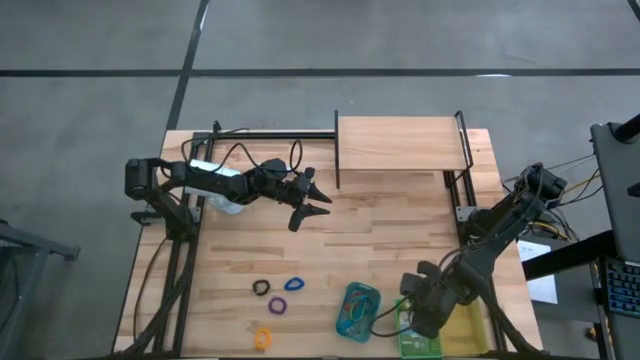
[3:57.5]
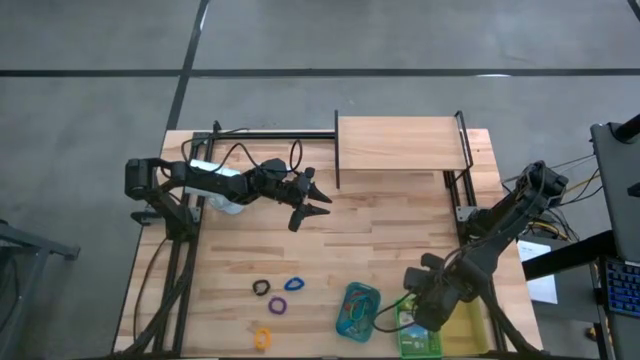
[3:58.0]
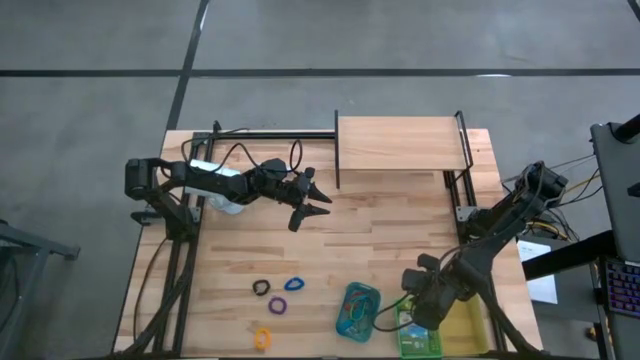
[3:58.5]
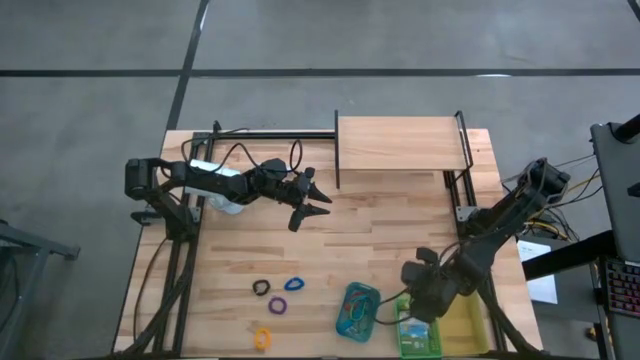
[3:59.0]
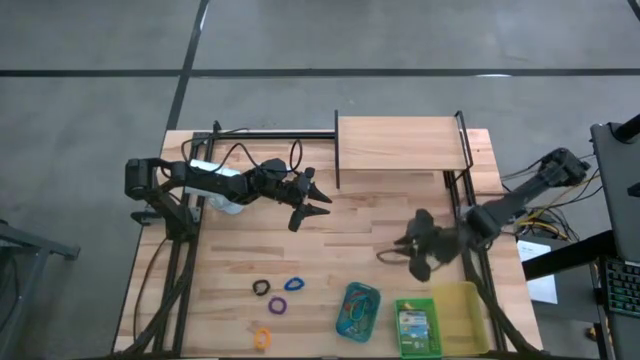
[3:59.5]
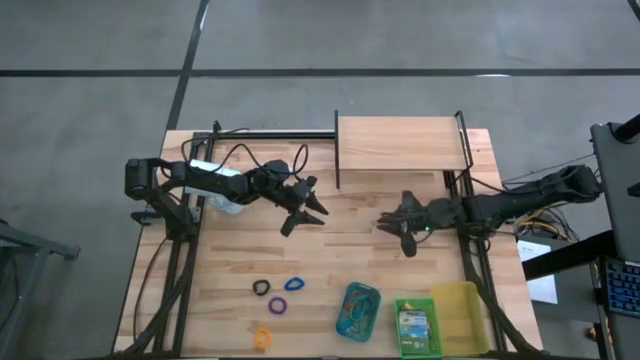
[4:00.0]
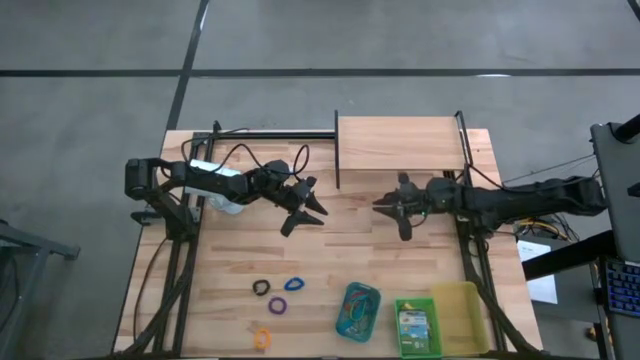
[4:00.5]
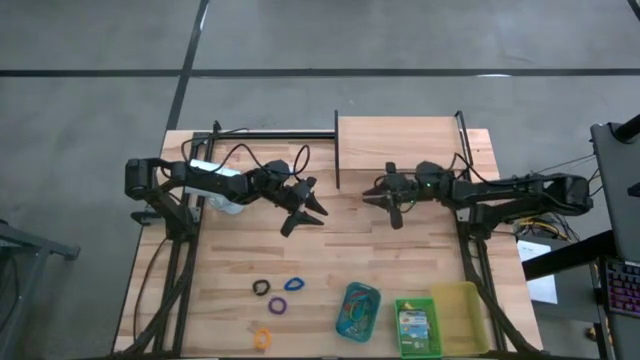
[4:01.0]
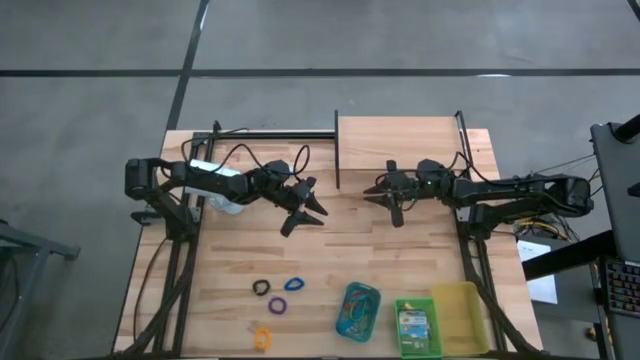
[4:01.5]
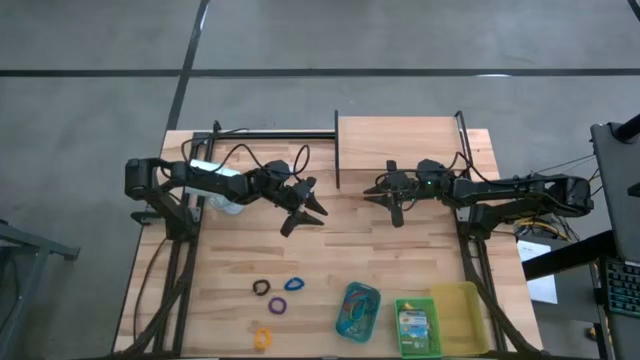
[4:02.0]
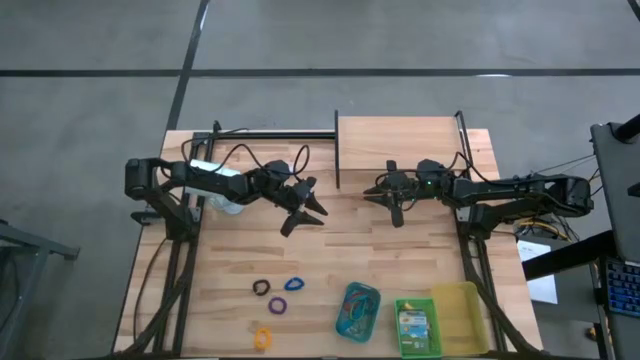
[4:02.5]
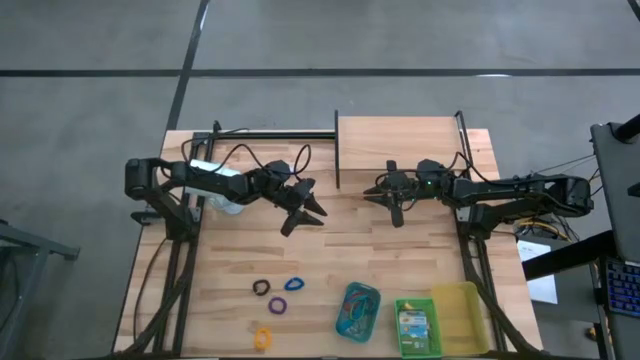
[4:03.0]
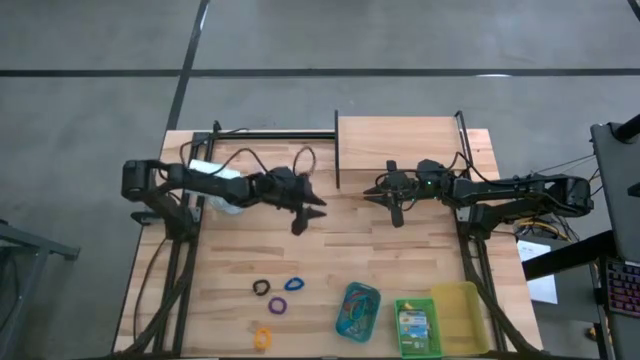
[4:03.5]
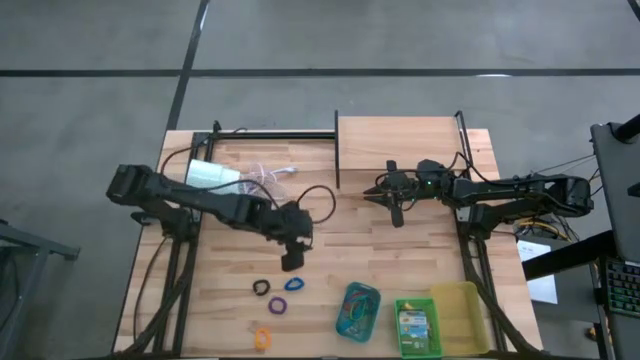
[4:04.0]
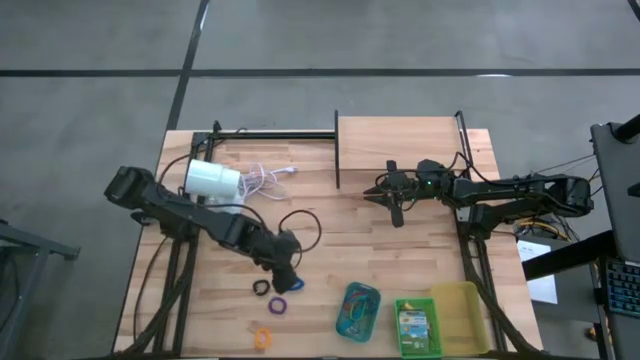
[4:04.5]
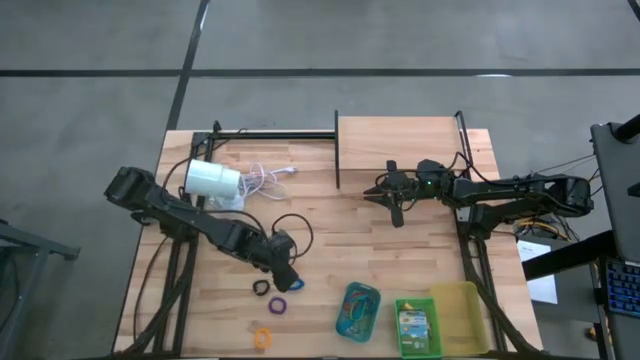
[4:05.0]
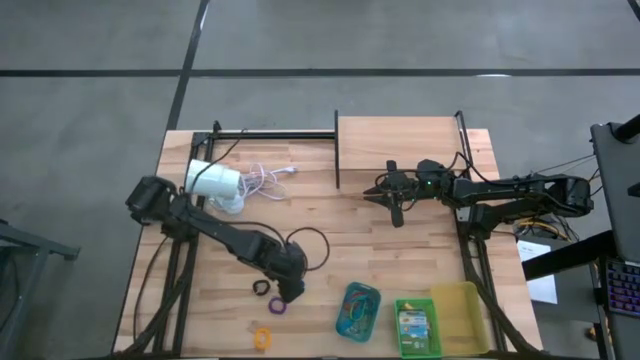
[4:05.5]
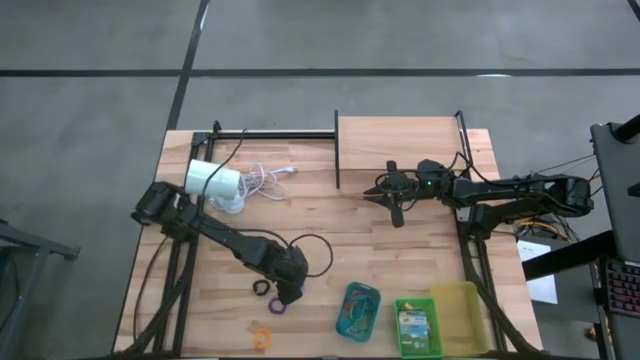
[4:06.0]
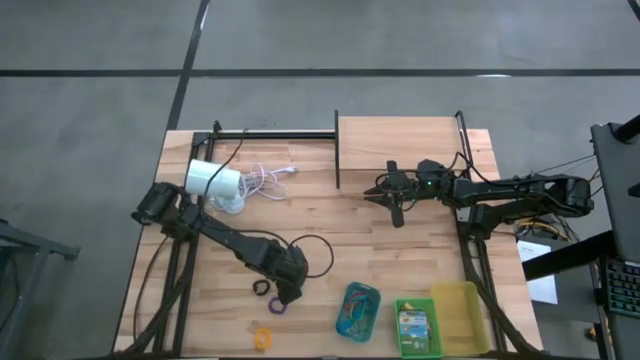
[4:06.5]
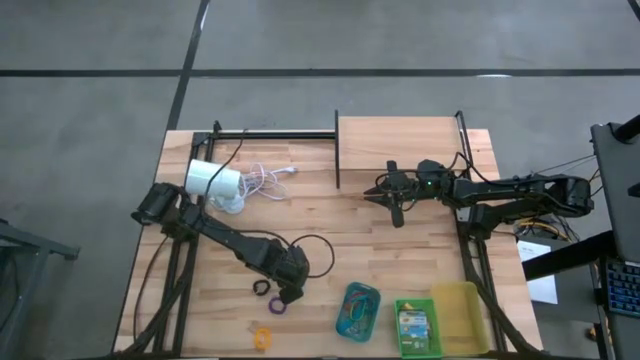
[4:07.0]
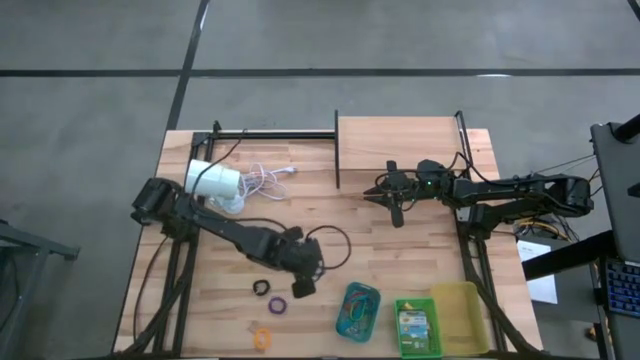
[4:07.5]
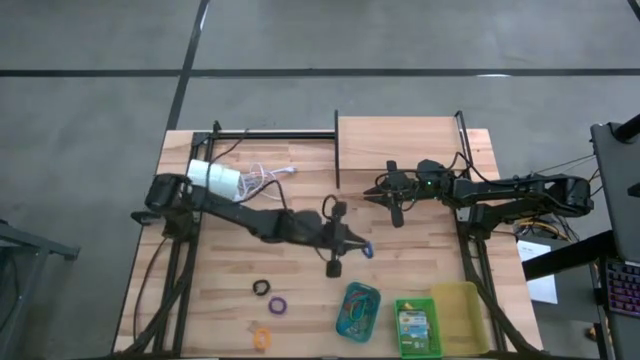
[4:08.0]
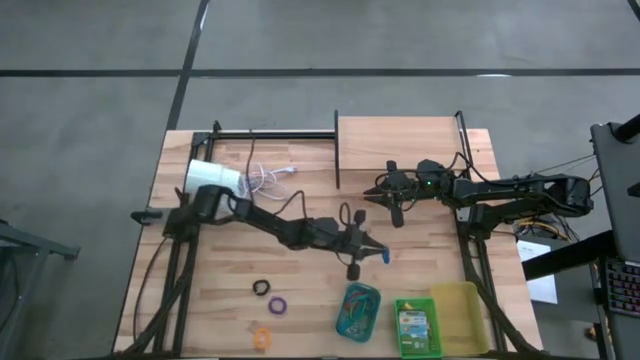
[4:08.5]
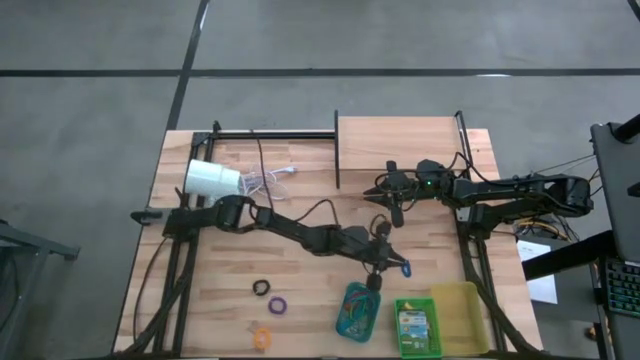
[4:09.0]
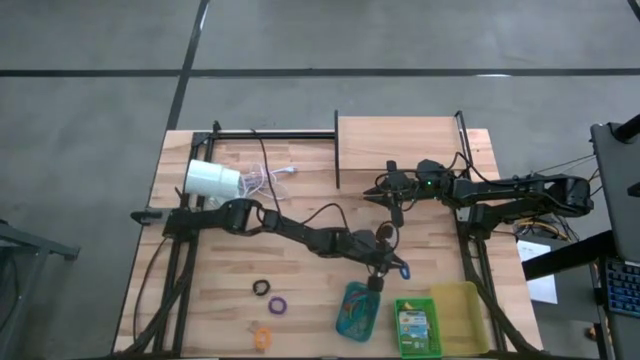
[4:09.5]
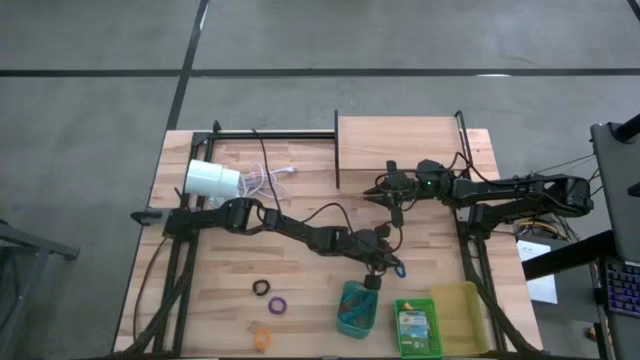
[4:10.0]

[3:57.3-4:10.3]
Task: Pick & Place Office Desk Supplies
Put the blue spring rubberband into the yellow bin

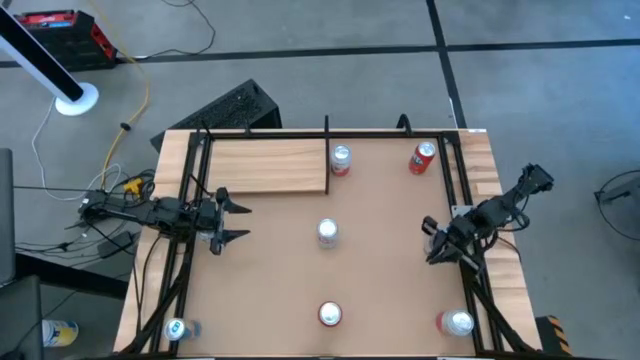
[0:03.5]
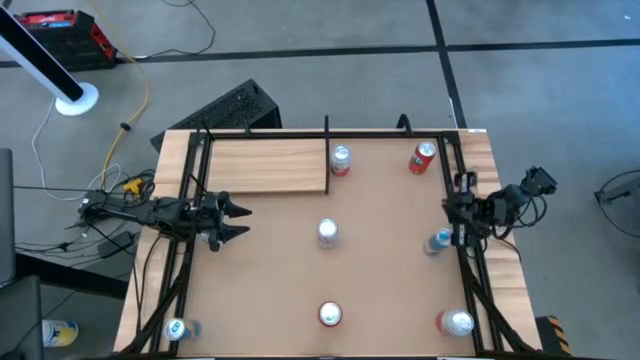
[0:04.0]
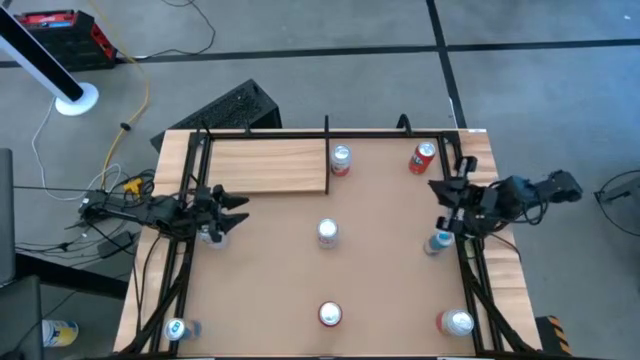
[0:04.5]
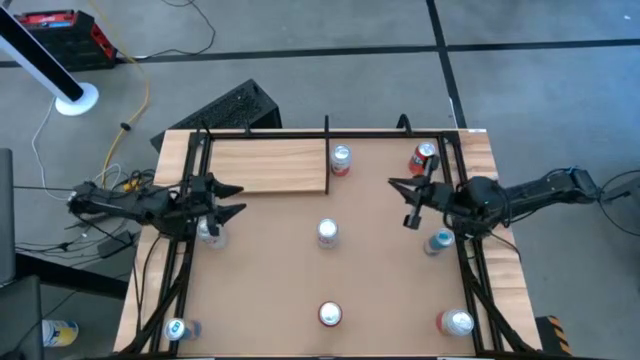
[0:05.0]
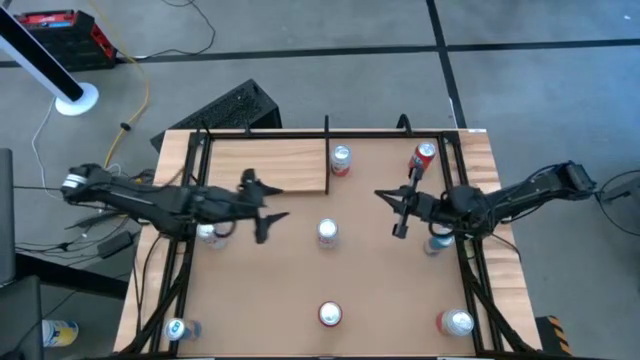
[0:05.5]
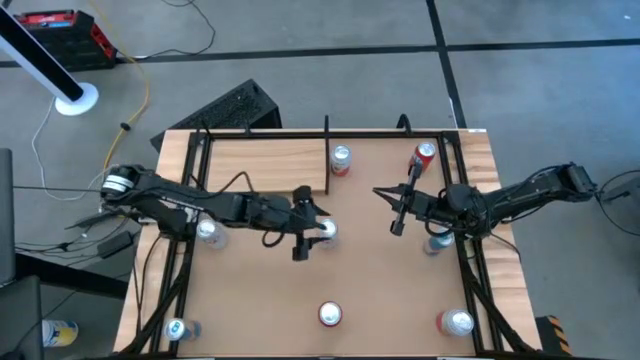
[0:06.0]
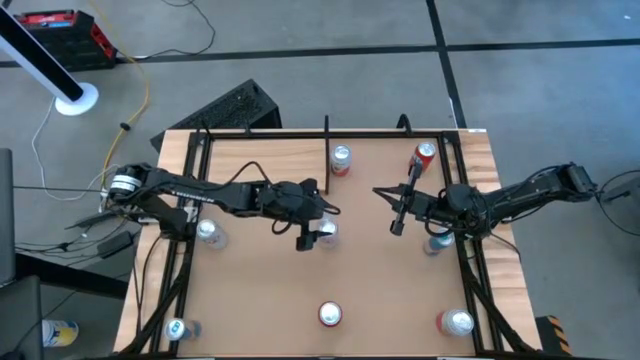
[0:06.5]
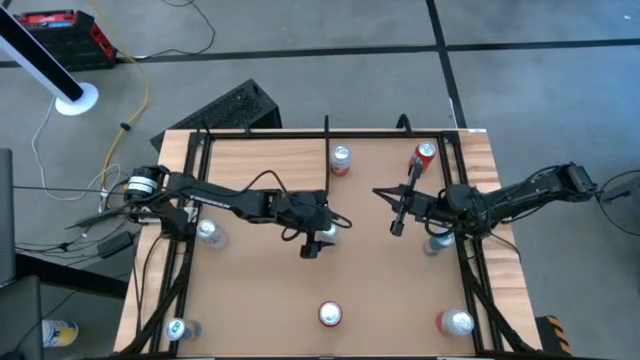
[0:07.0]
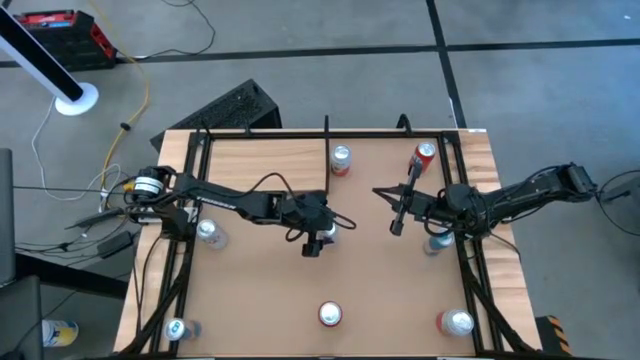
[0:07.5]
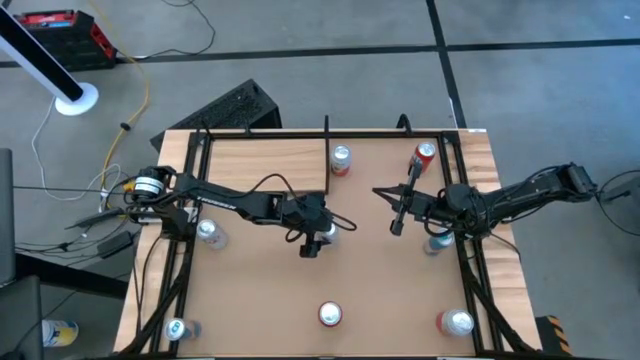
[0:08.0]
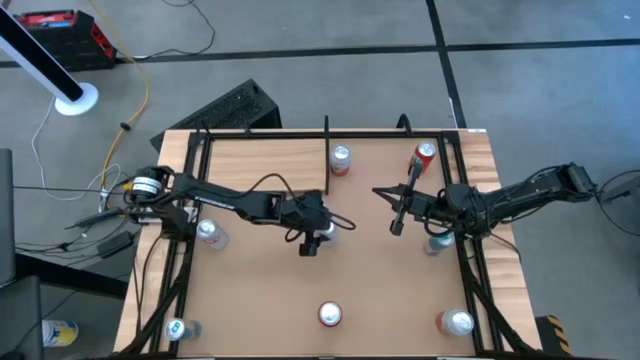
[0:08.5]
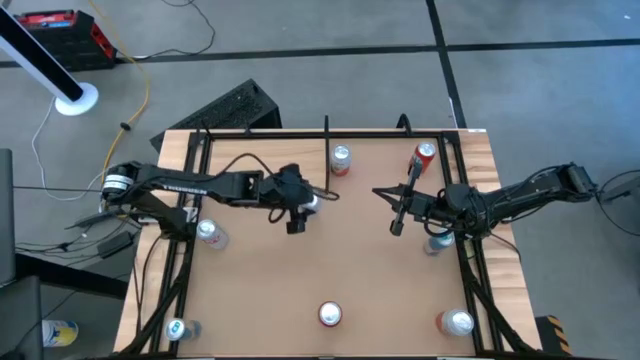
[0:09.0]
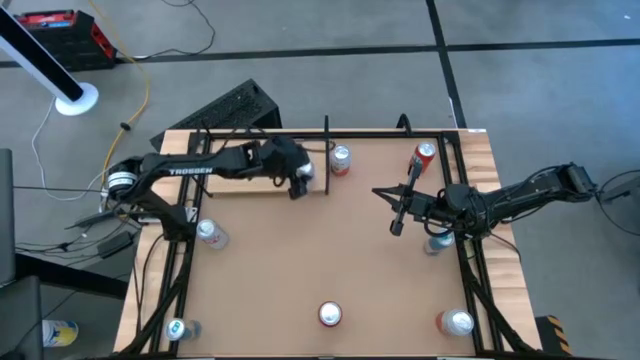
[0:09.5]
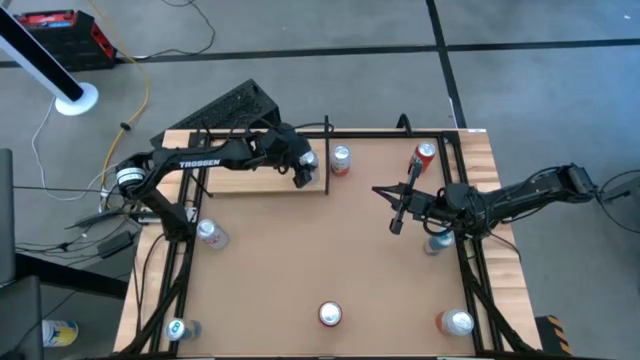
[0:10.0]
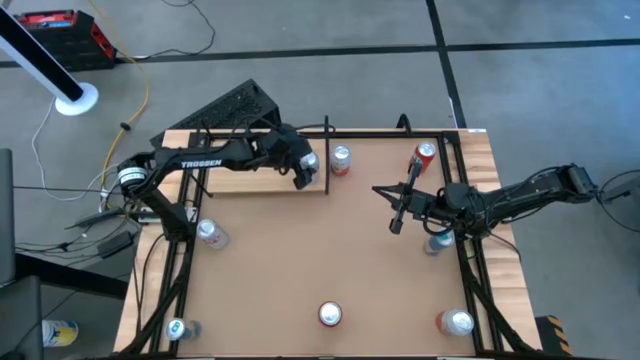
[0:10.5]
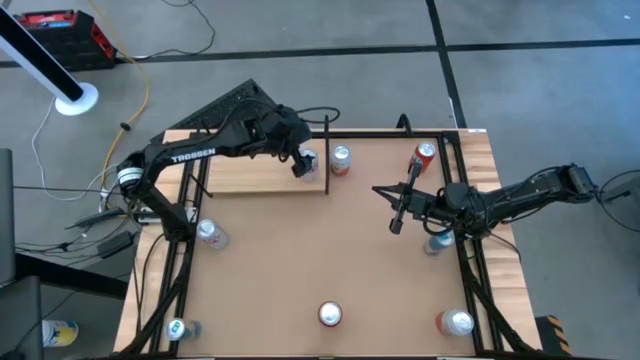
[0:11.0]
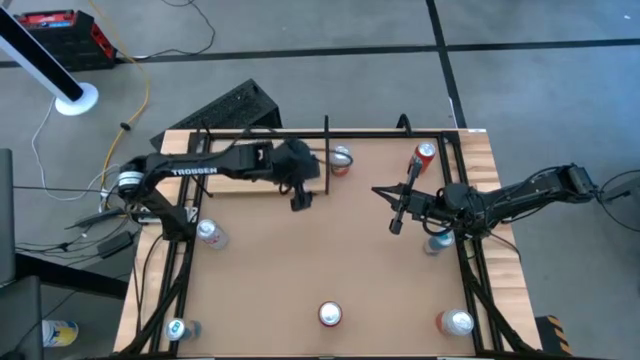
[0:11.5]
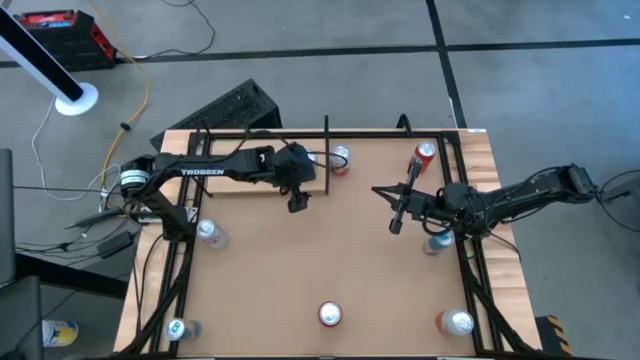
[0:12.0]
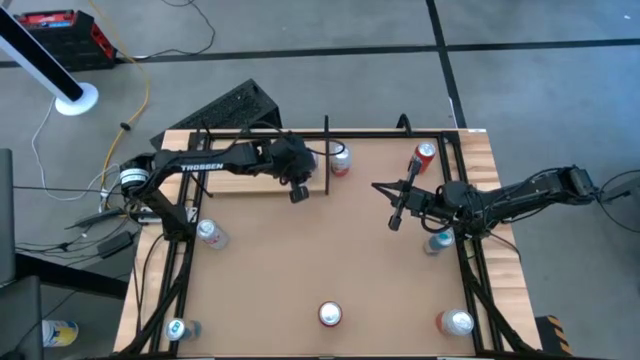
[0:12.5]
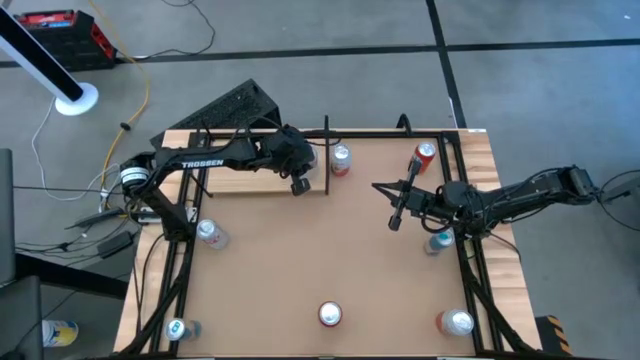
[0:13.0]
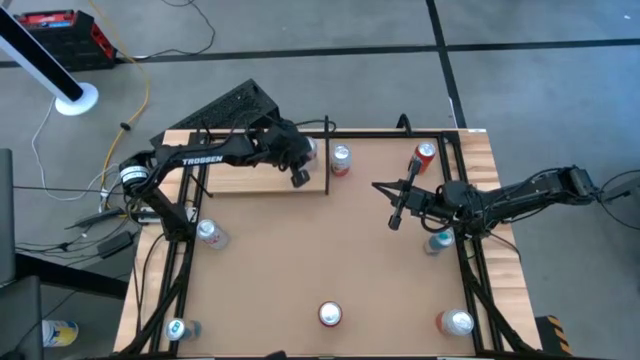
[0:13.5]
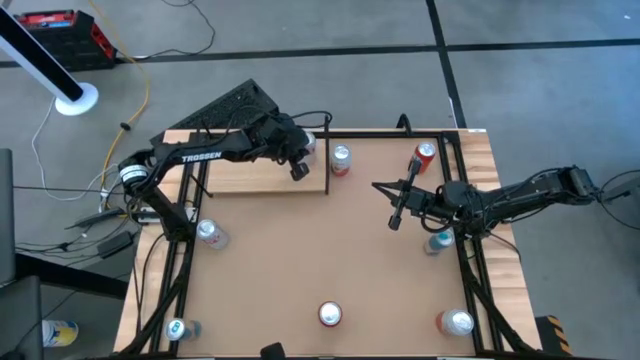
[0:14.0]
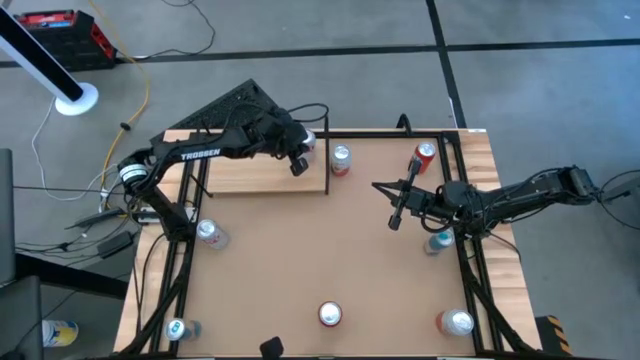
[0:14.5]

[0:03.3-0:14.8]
Task: Place canned beverage on shelf
Put the right red-silver soda can on the shelf
